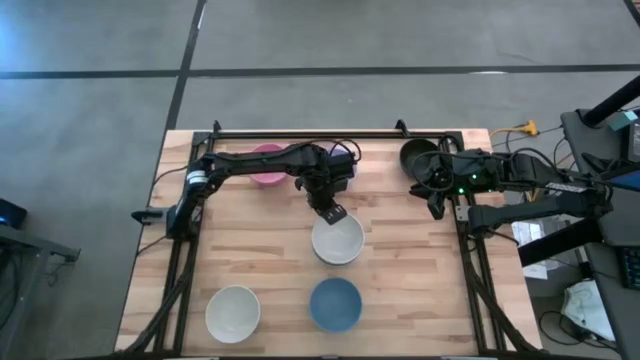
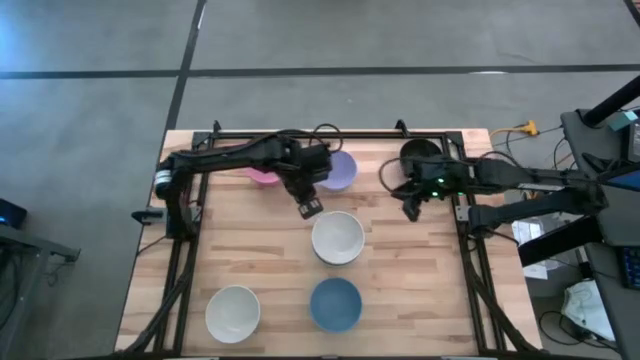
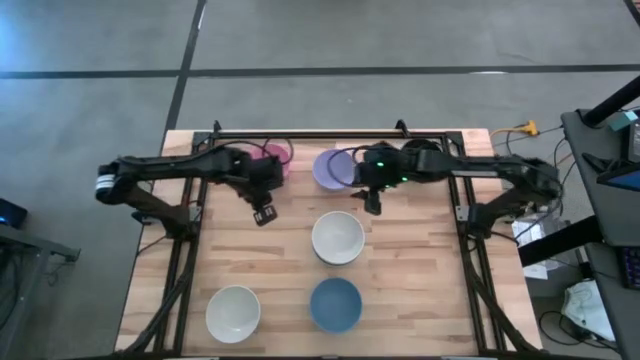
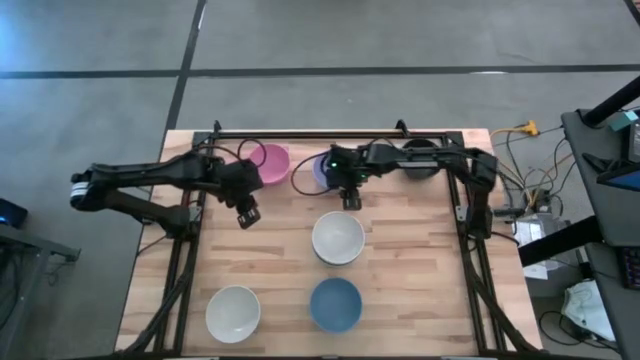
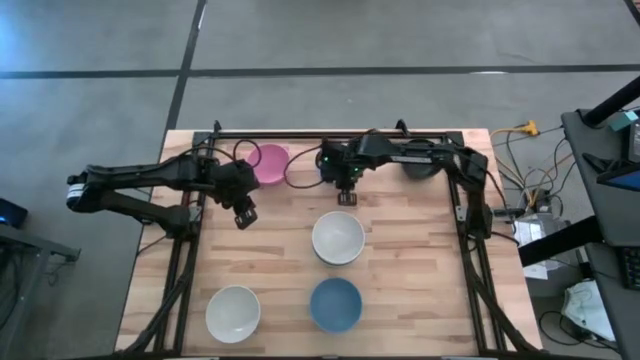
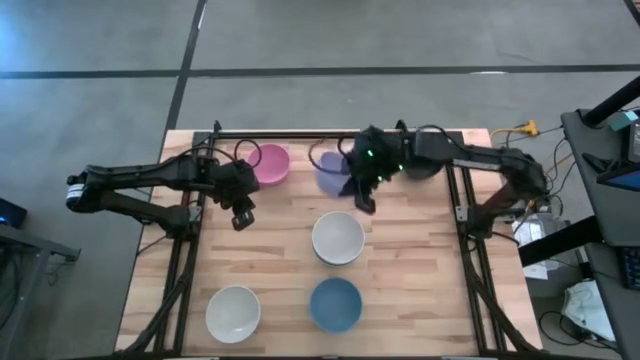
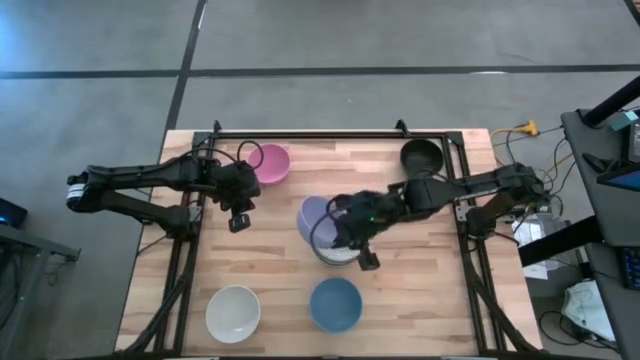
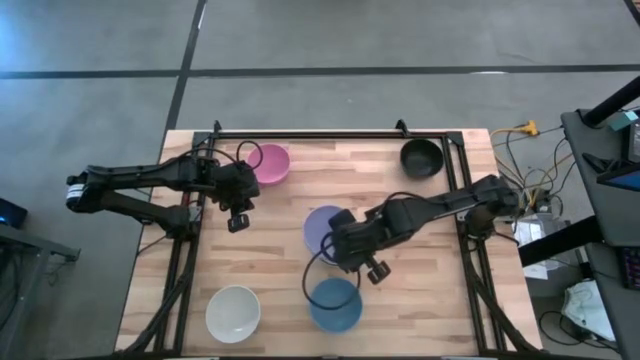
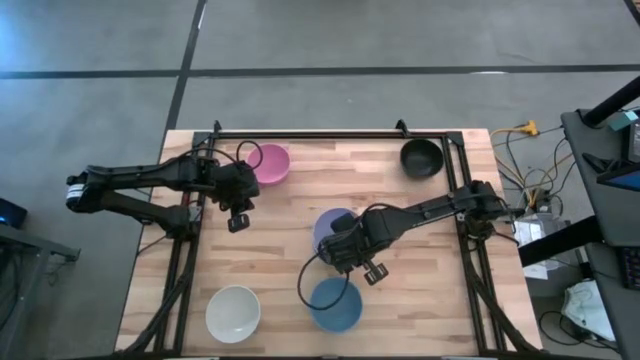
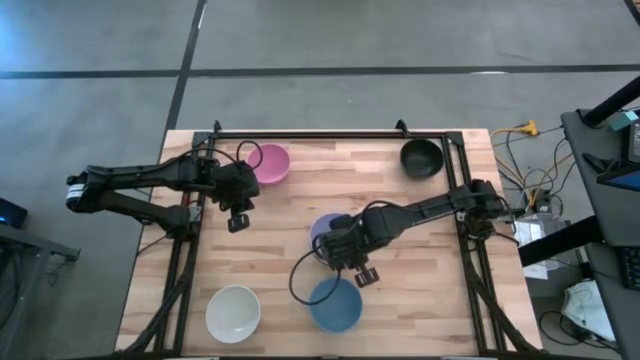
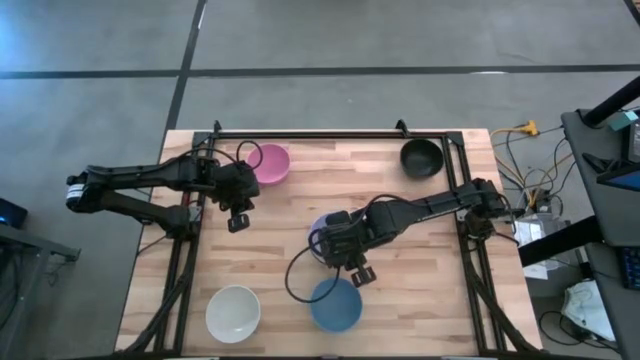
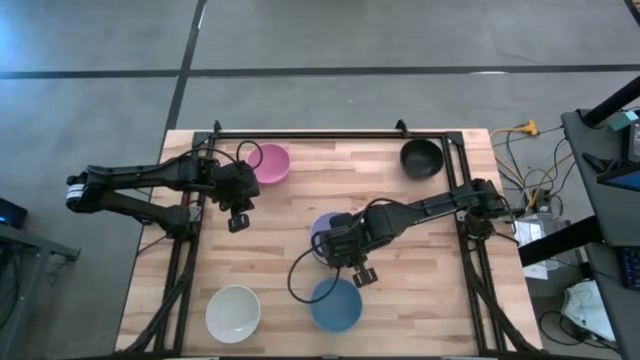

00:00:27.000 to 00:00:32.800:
Task: Nest bowls inside each other
Stack the purple bowl on top of the stacked white bowl

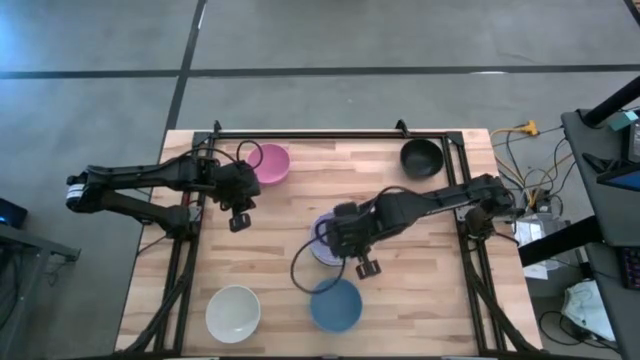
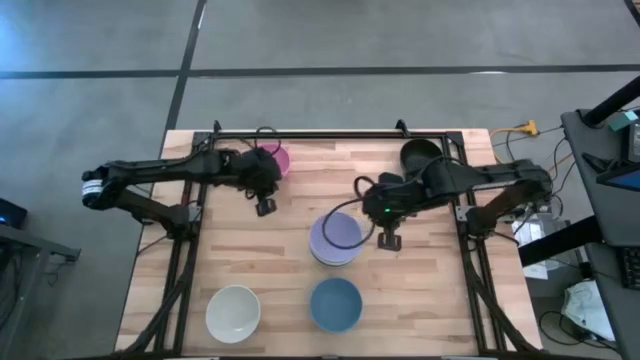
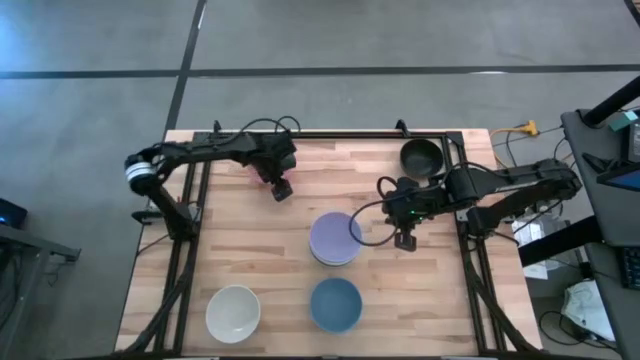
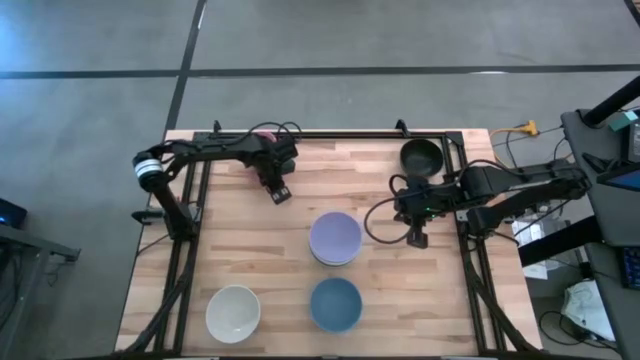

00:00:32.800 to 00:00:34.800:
Stack the pink bowl on top of the stacked purple bowl

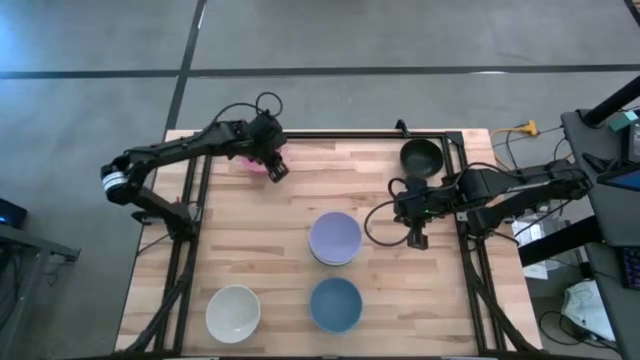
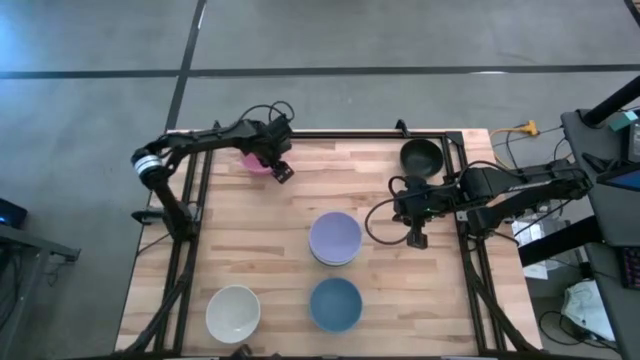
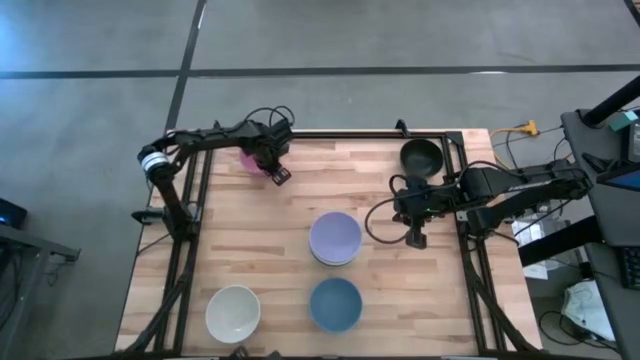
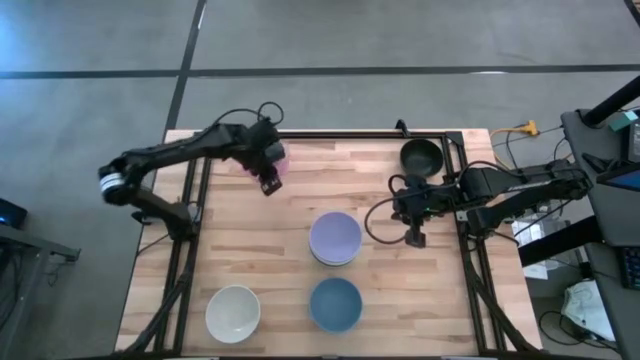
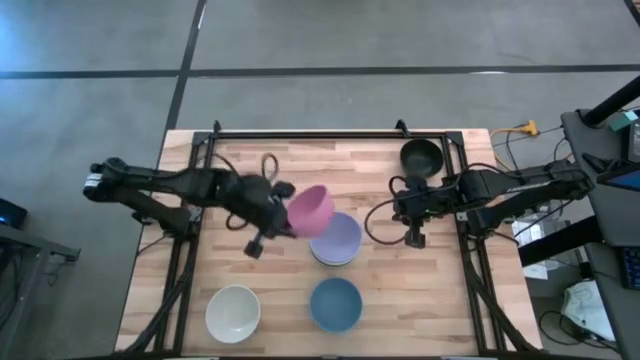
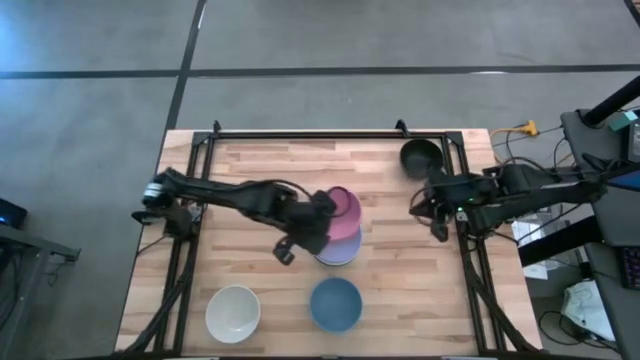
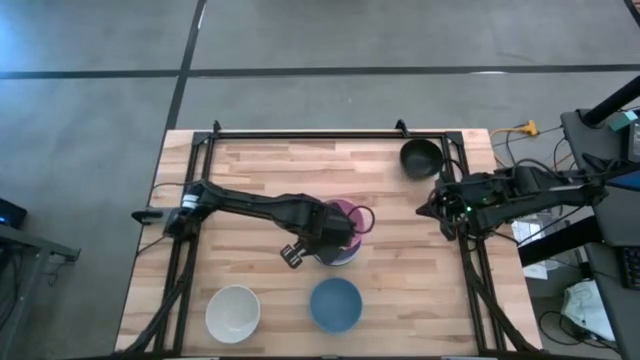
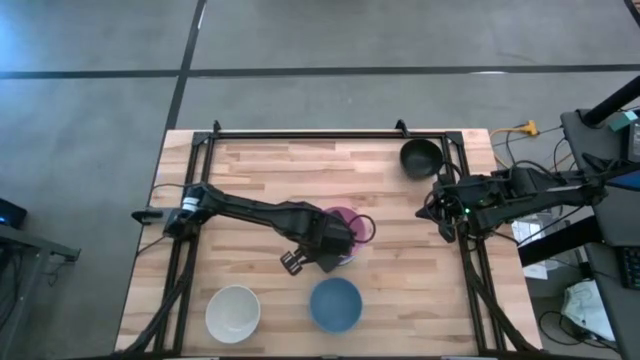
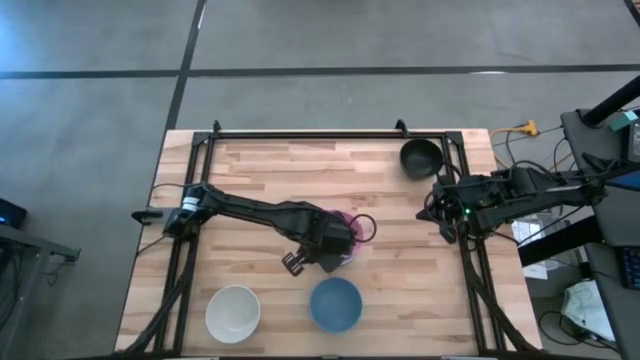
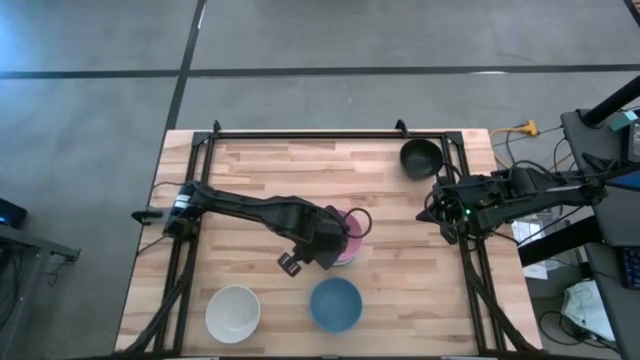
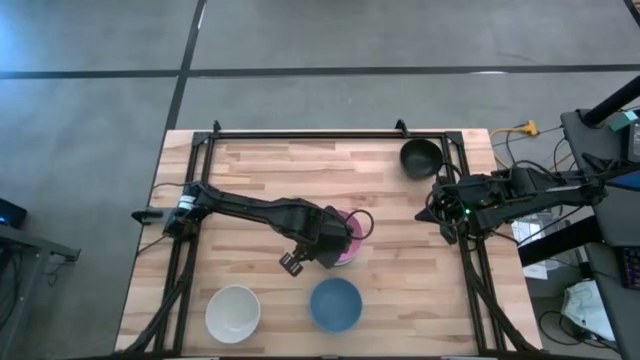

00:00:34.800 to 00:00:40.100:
Stack the pink bowl on top of the stacked purple bowl

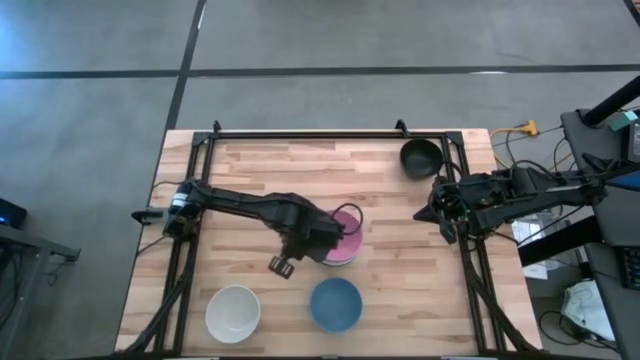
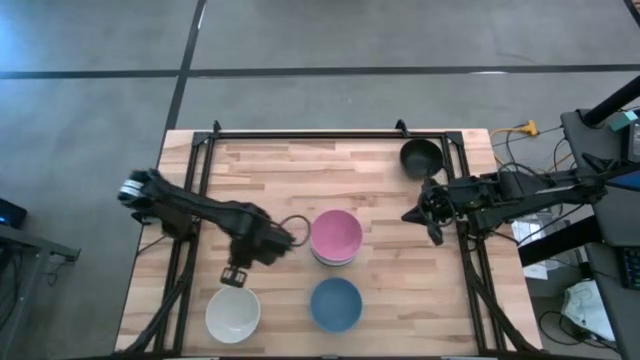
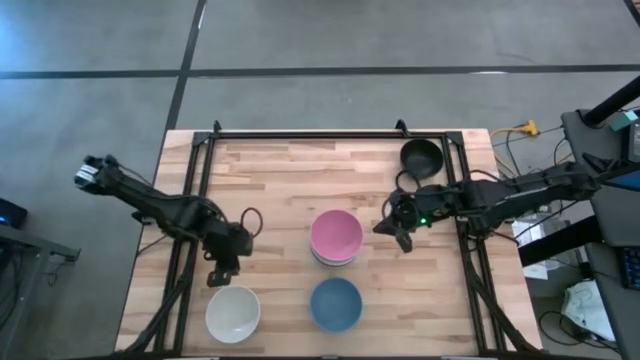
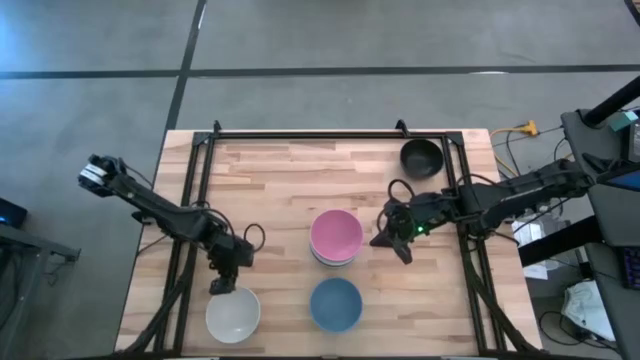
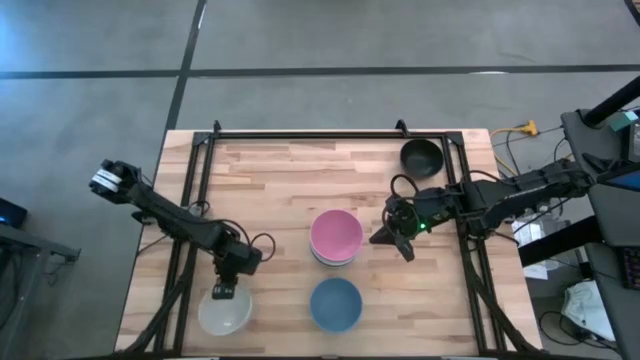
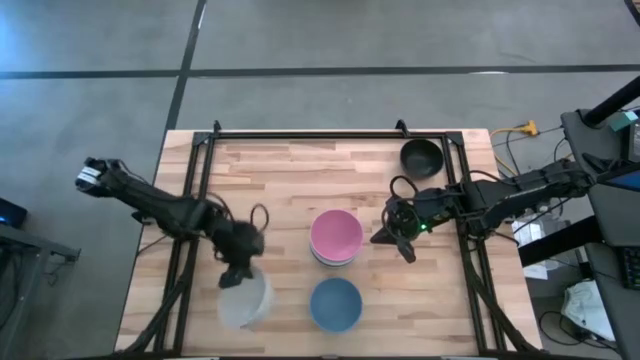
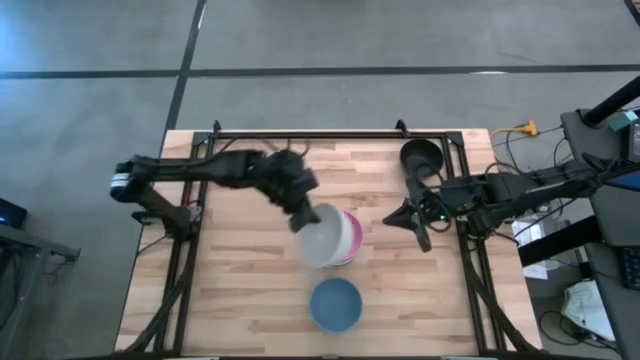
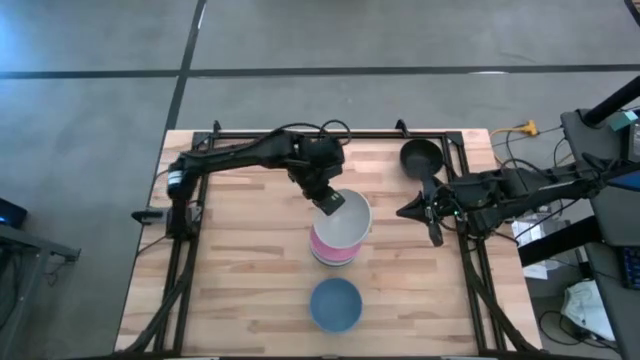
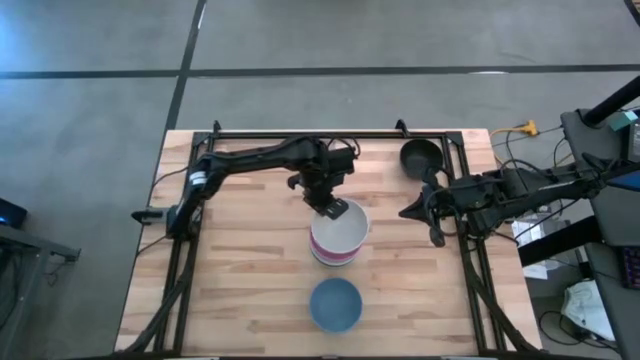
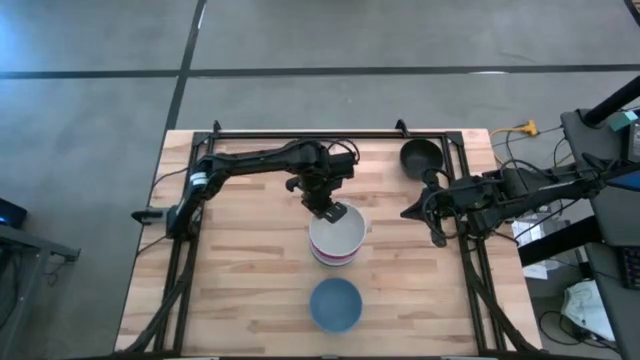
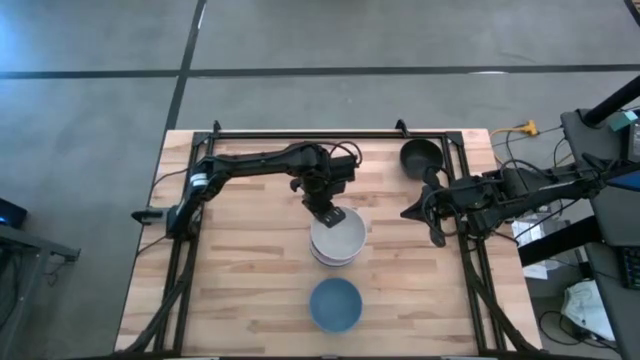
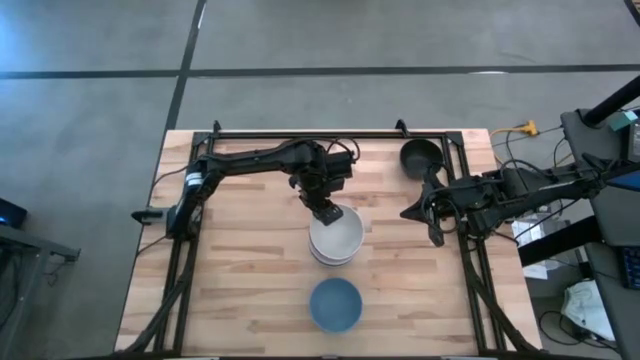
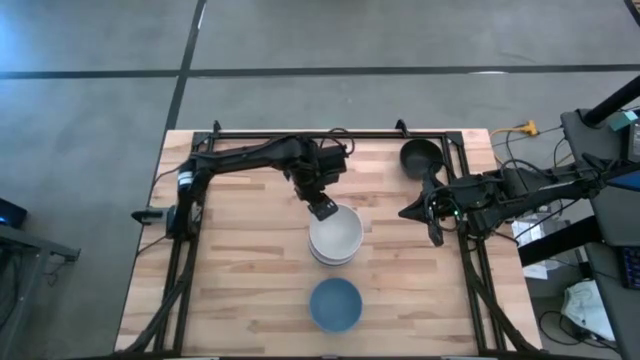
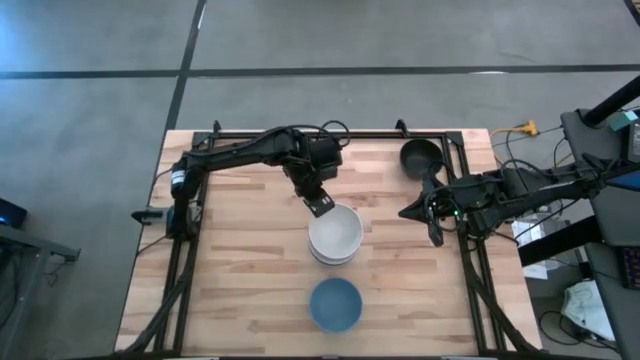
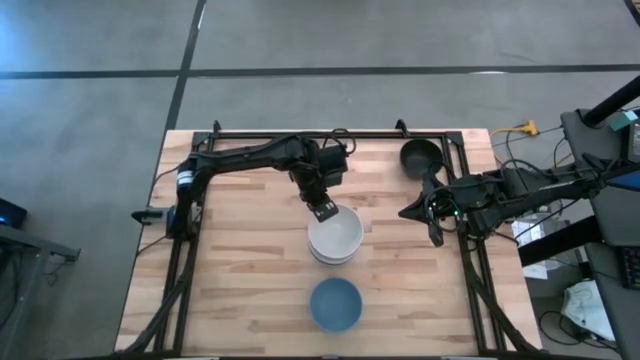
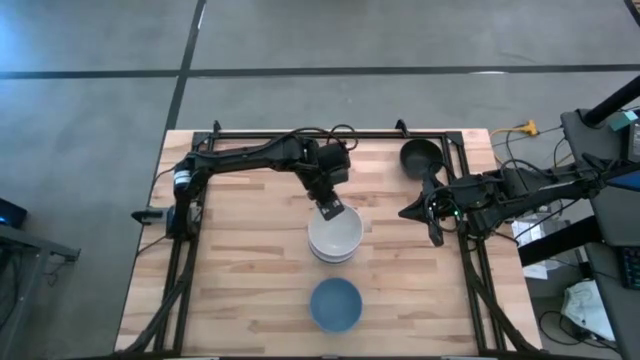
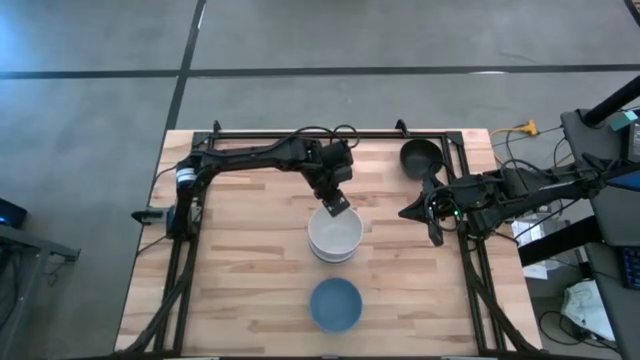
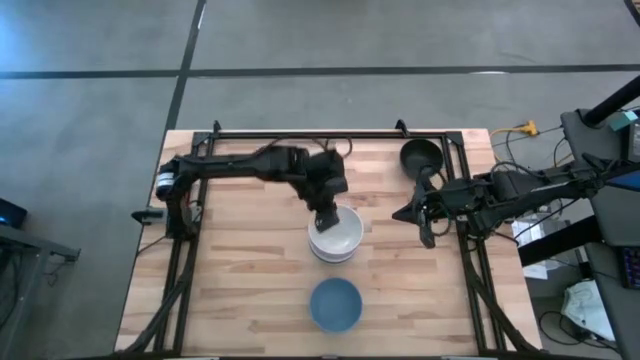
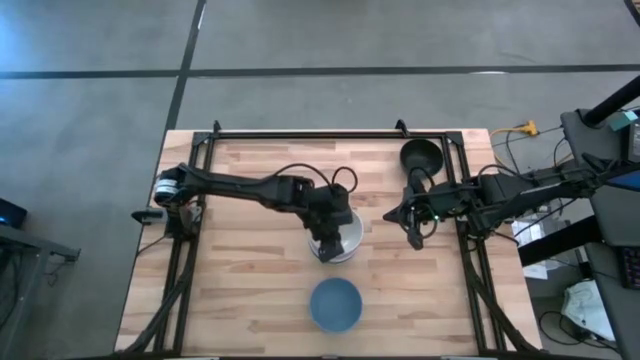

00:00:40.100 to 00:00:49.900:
Stack the white bowl on top of the stacked pink bowl
